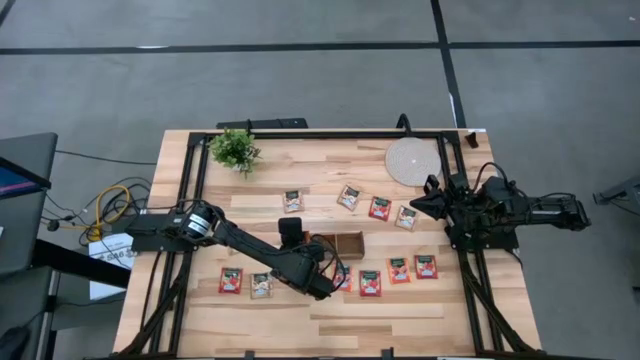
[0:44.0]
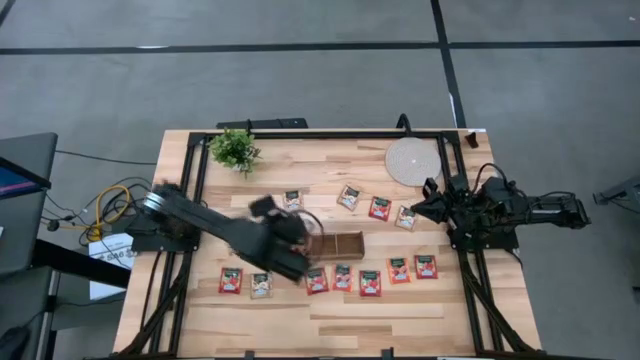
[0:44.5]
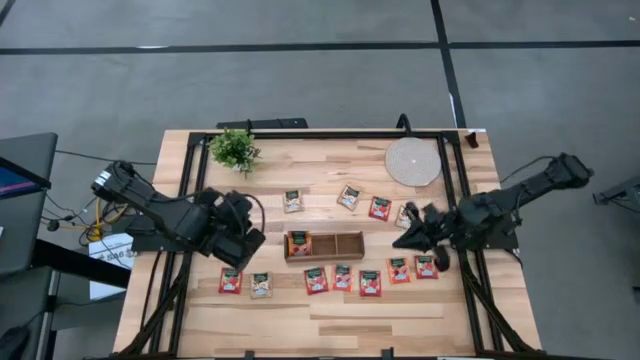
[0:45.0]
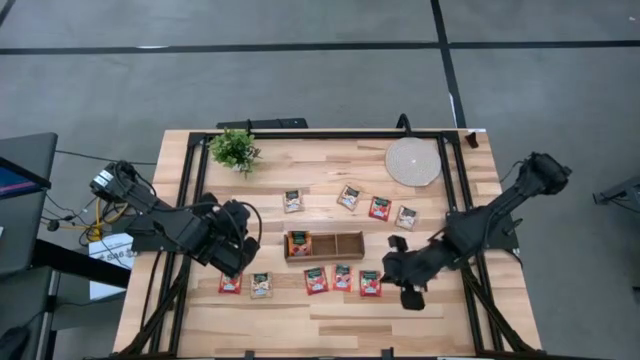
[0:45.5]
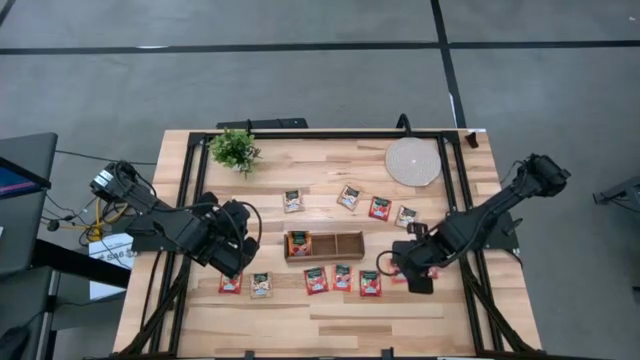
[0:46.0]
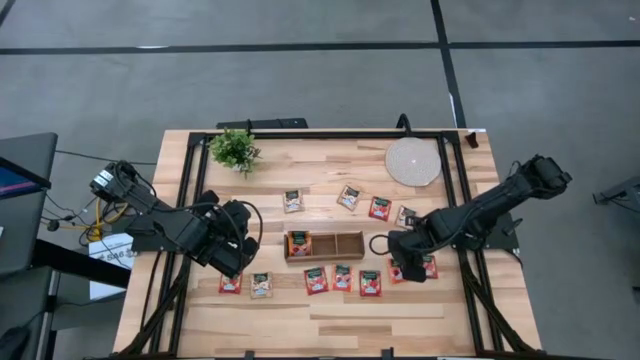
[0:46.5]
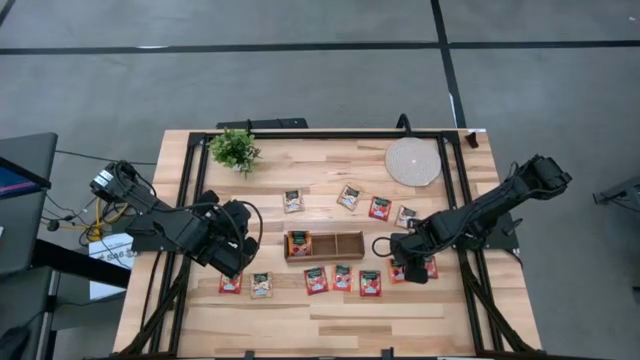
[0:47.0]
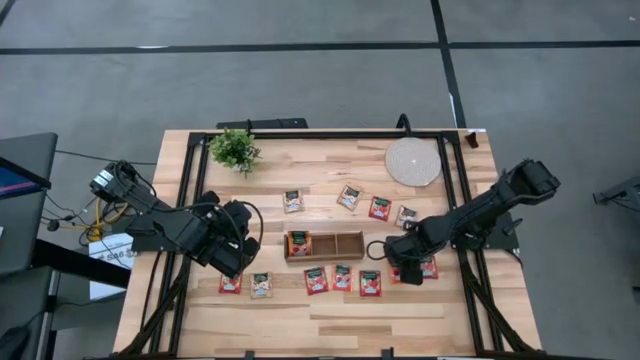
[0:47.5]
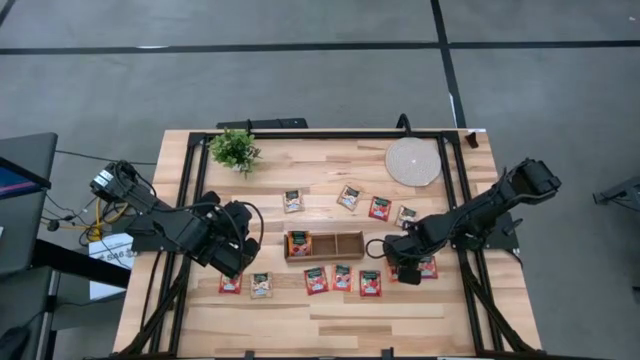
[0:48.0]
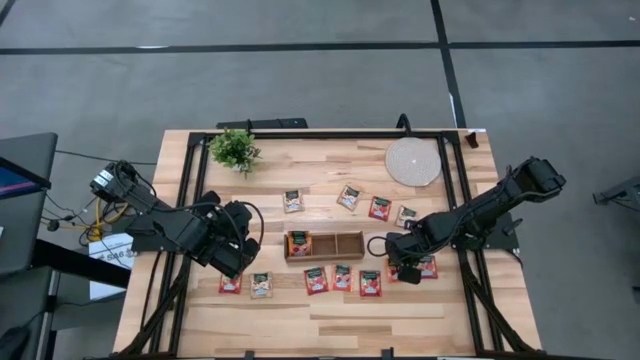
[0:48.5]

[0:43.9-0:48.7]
Task: Pick & Place Tea
Put the orange tea bag into the left section of the wooden organizer

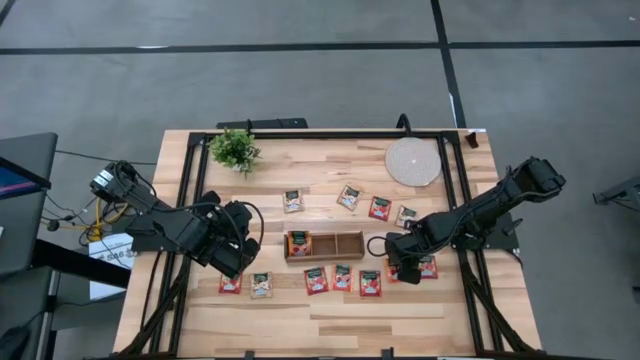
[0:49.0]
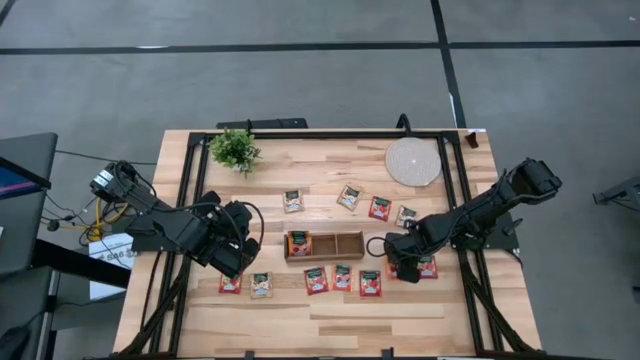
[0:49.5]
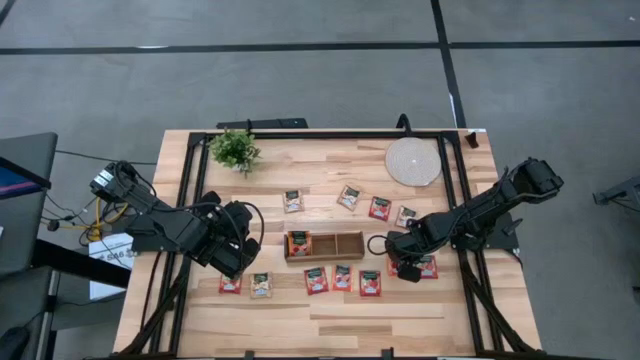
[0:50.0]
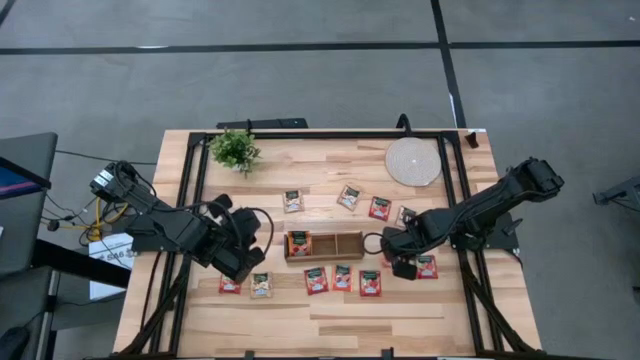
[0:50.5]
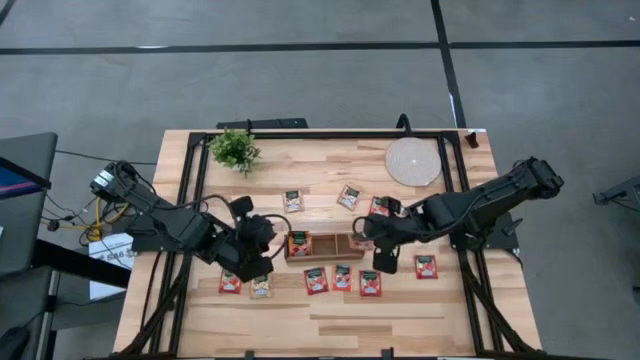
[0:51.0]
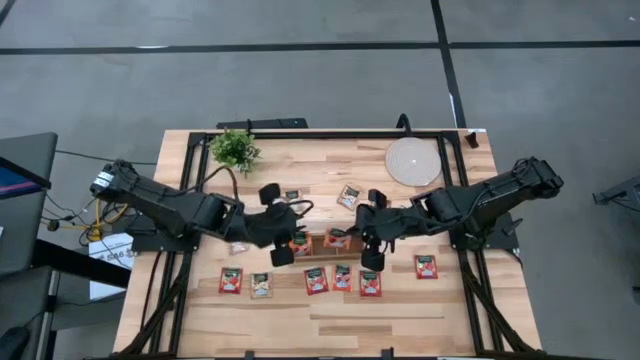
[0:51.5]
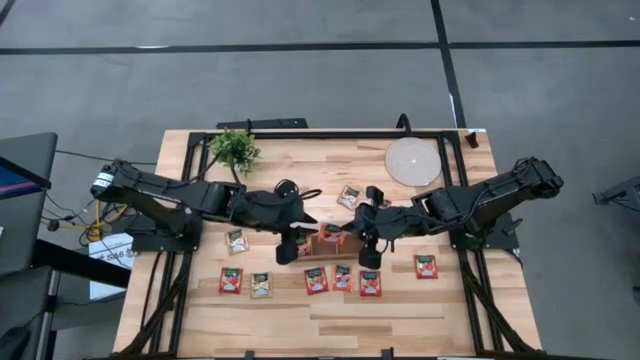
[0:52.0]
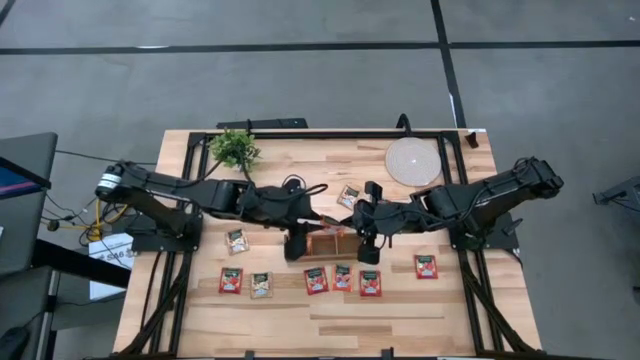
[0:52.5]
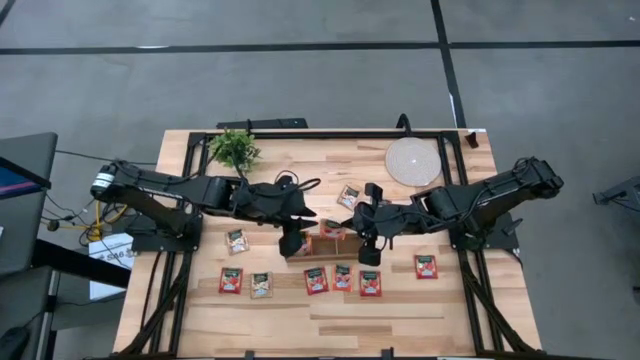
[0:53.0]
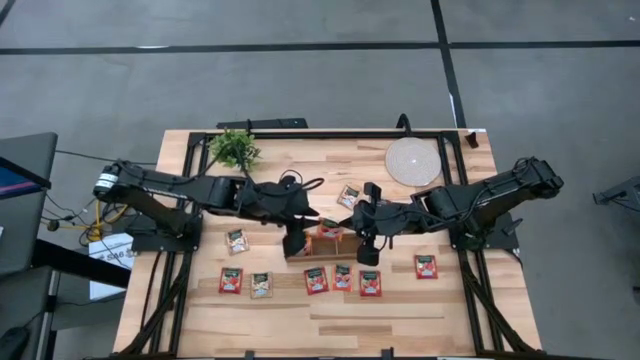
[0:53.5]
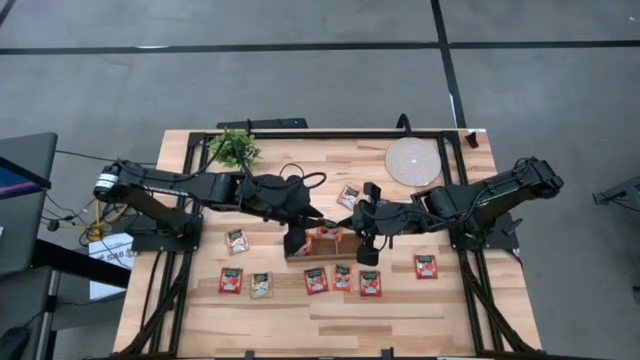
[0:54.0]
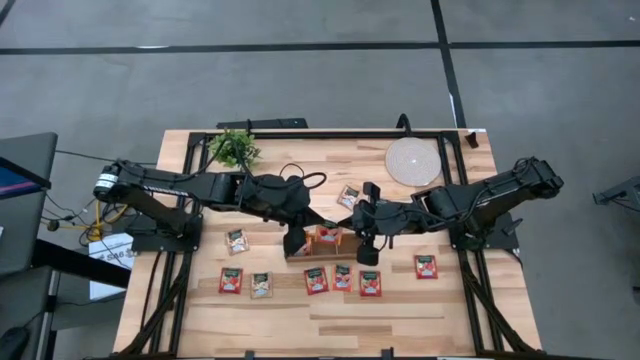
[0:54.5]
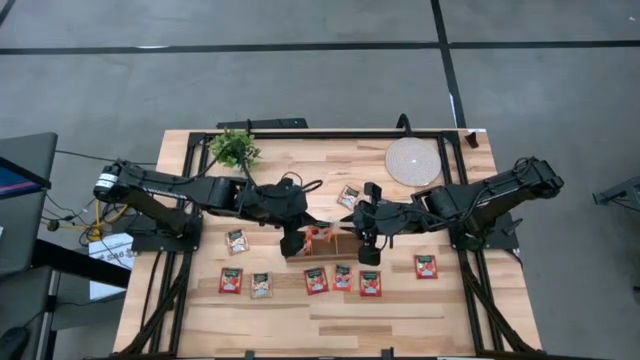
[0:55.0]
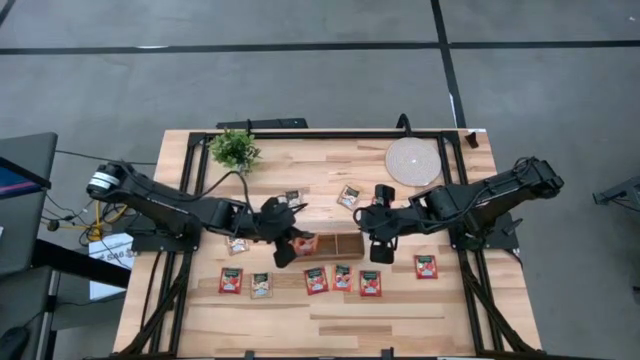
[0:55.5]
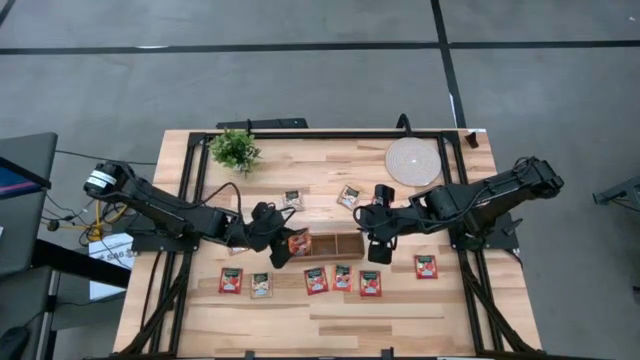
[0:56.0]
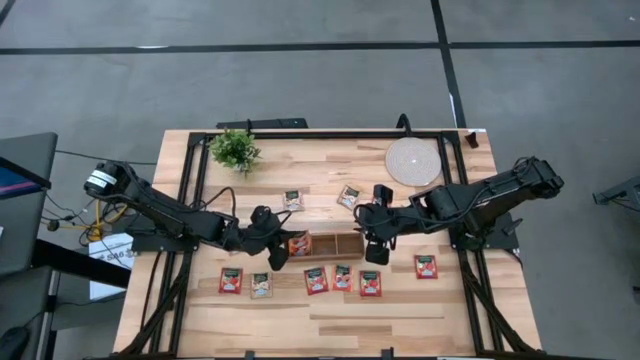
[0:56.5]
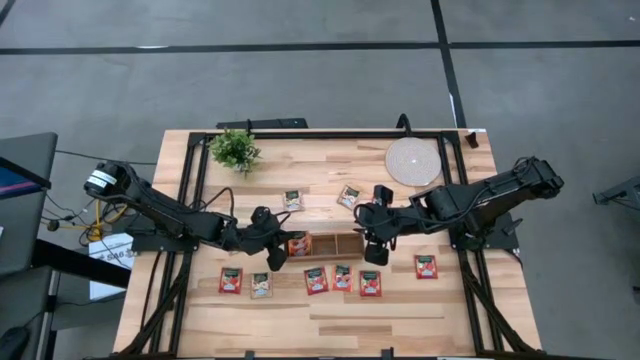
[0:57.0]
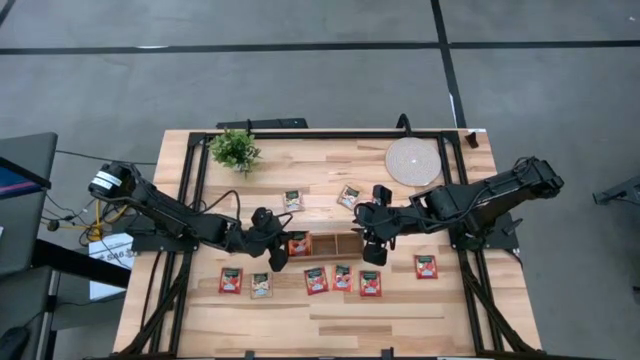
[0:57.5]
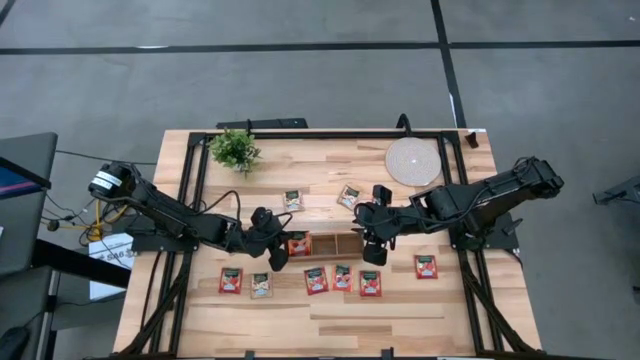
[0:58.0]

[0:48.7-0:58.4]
Put the orange tea bag into the left section of the wooden organizer

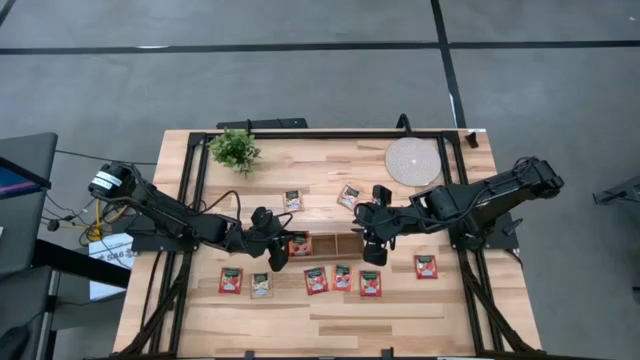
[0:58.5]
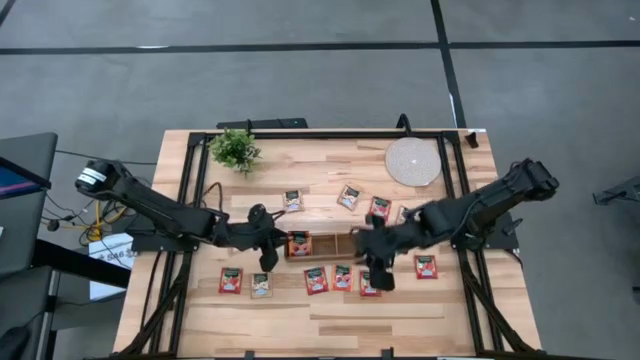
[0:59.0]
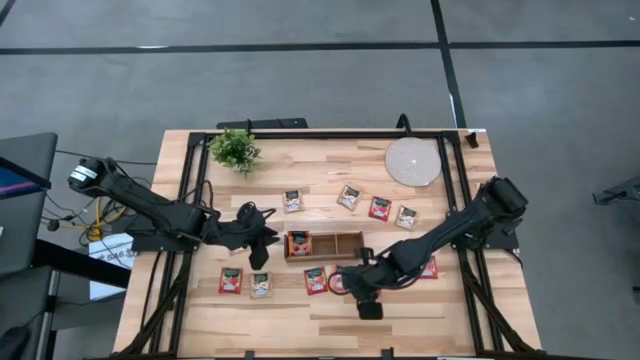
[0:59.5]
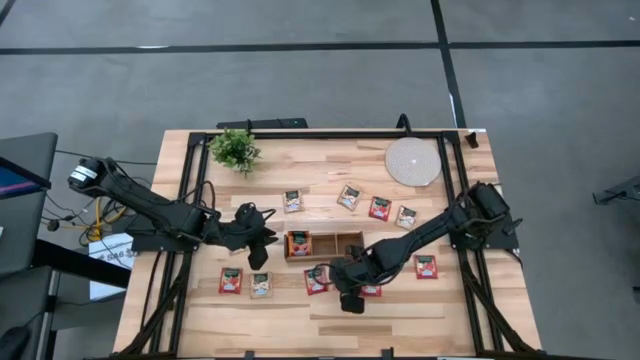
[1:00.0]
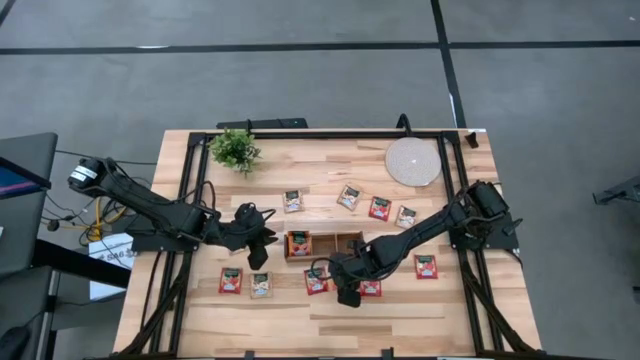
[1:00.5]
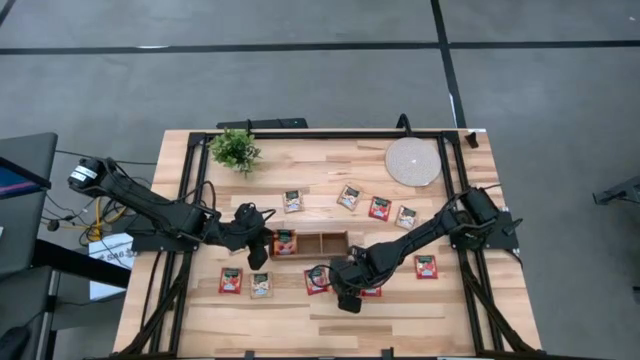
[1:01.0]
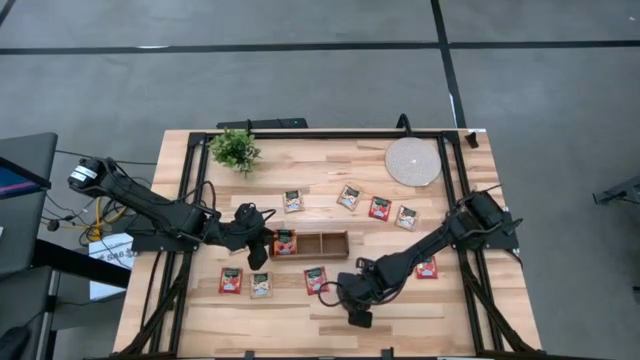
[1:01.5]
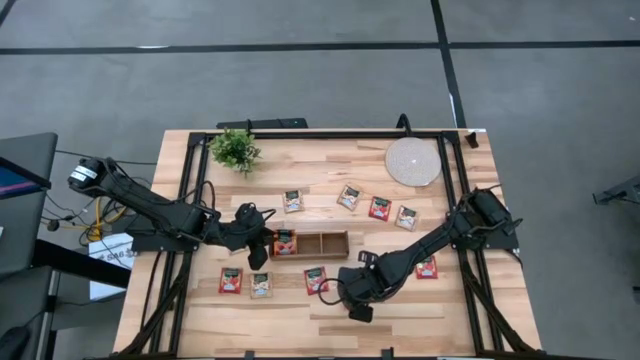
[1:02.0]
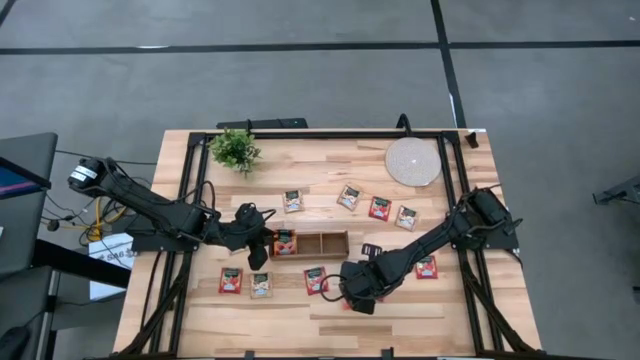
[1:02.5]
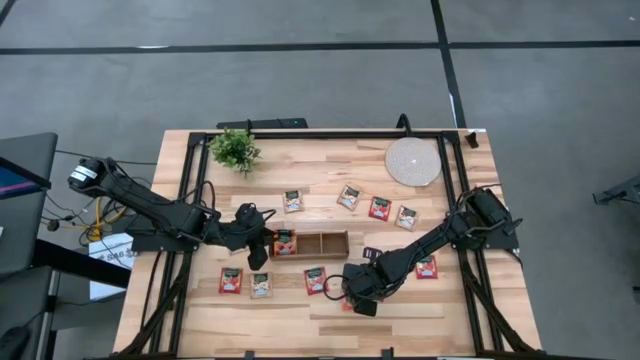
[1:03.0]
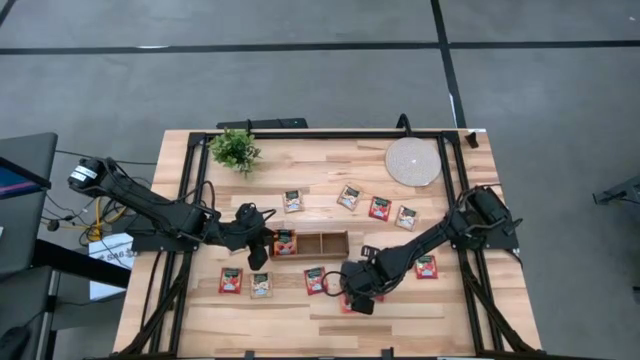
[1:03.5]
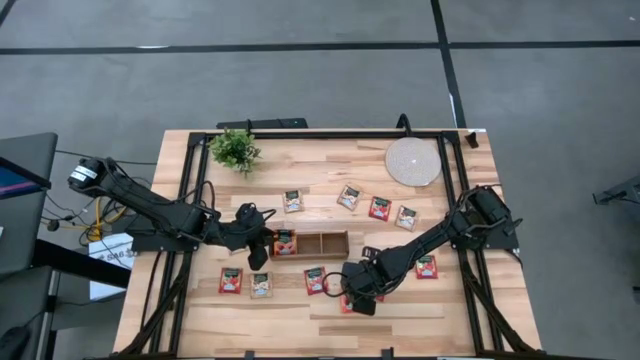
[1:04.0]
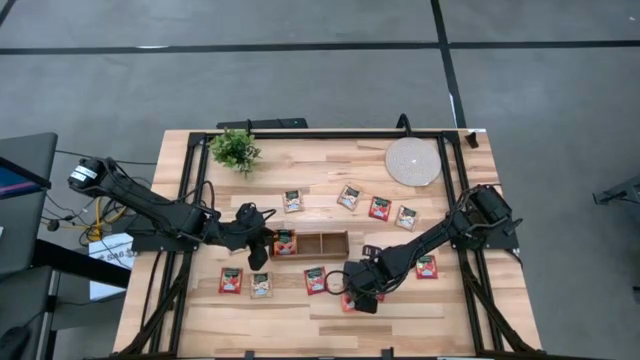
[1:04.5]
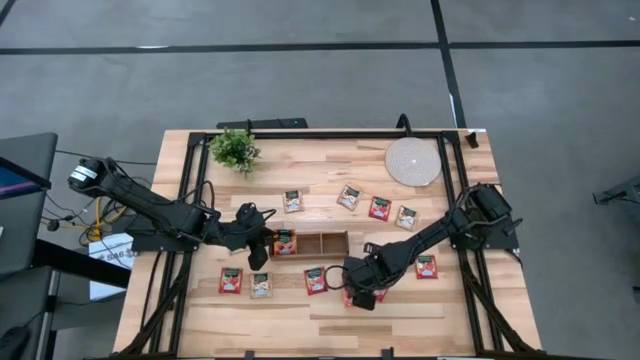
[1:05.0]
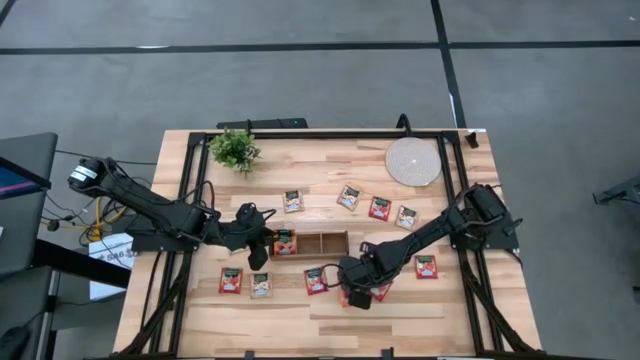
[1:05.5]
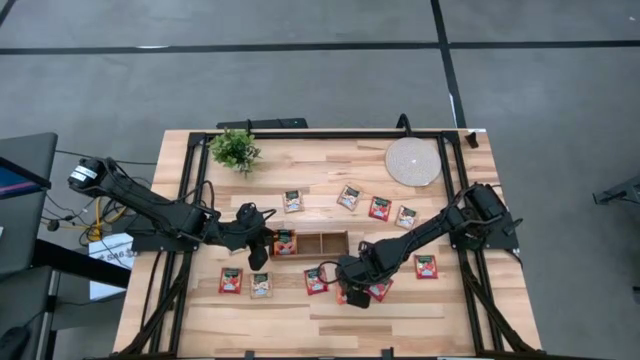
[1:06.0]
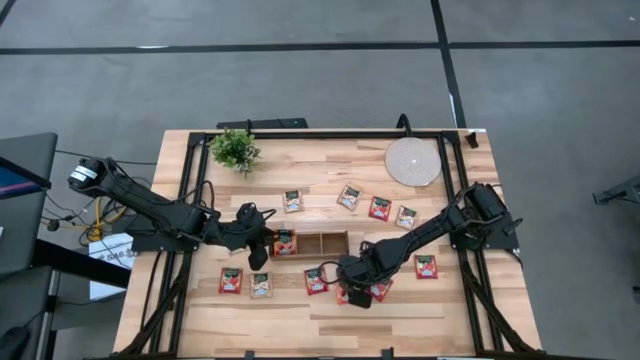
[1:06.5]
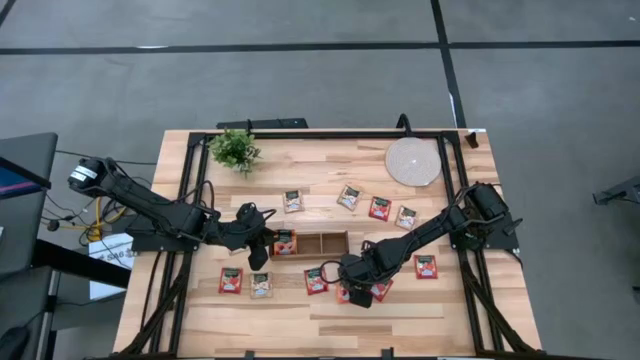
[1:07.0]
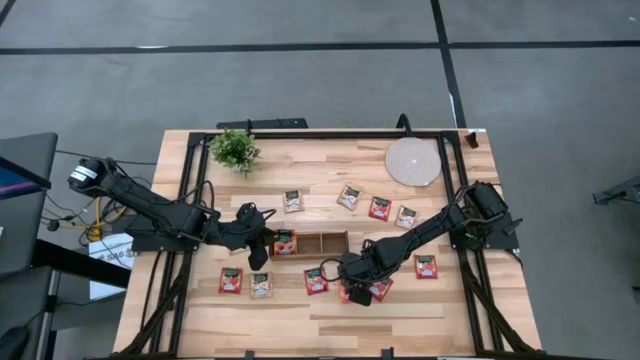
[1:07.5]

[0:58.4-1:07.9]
Put the orange tea bag into the left section of the wooden organizer
